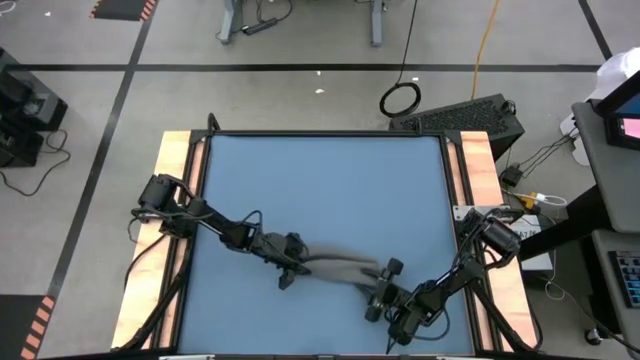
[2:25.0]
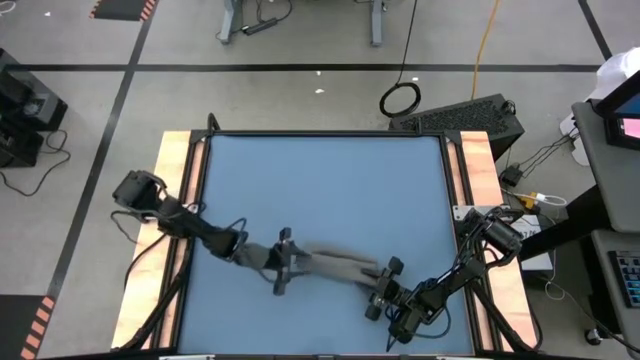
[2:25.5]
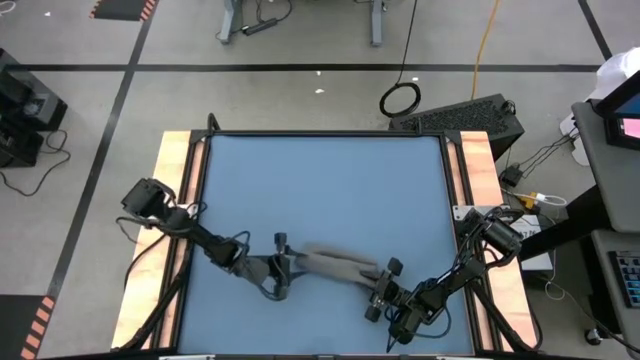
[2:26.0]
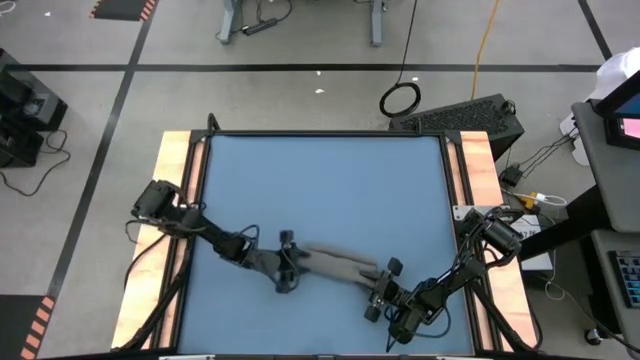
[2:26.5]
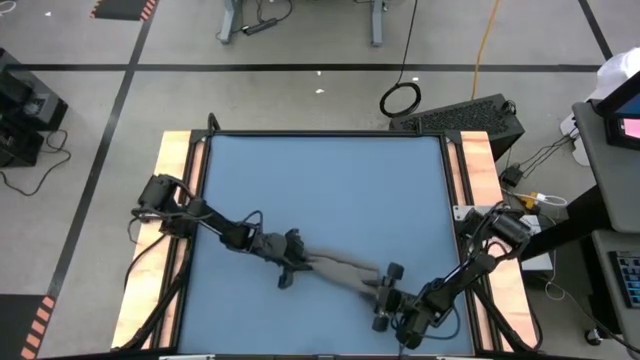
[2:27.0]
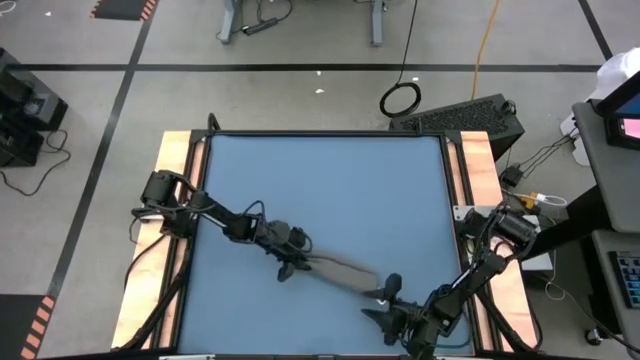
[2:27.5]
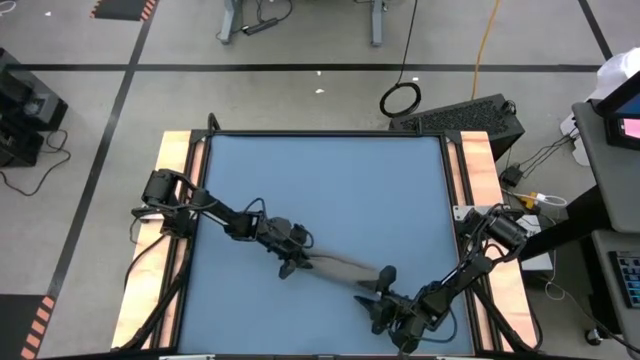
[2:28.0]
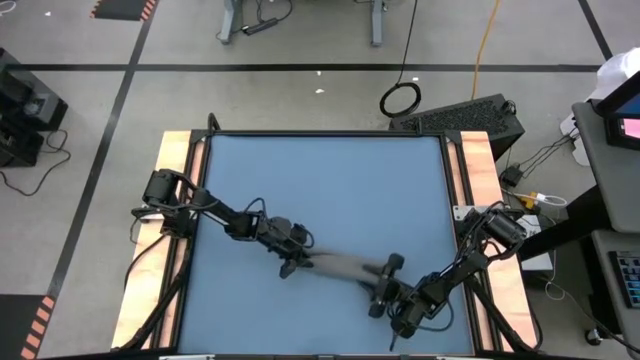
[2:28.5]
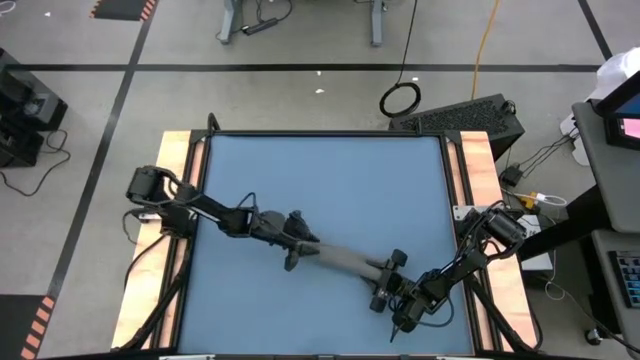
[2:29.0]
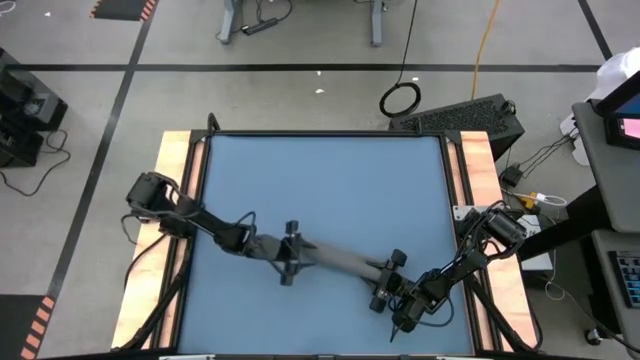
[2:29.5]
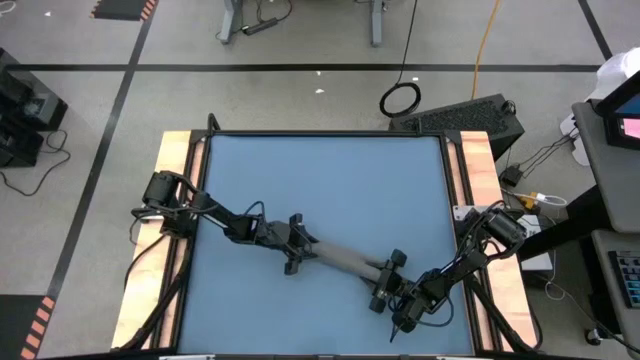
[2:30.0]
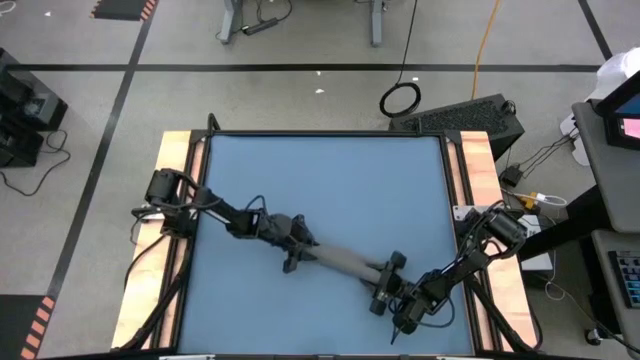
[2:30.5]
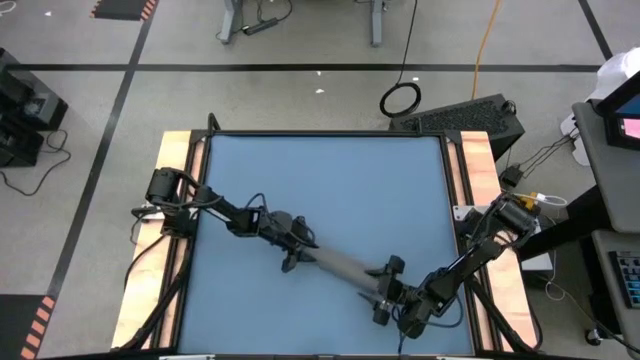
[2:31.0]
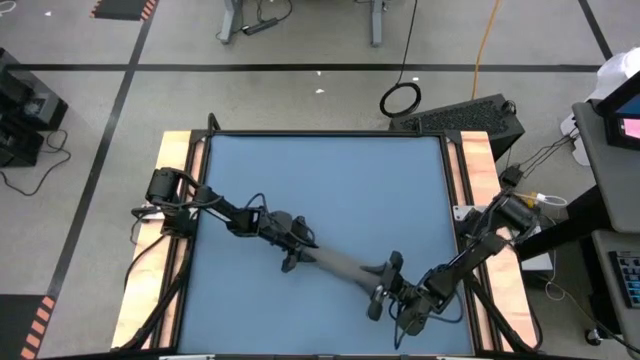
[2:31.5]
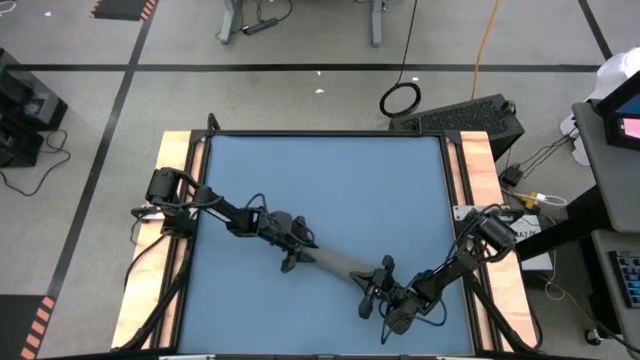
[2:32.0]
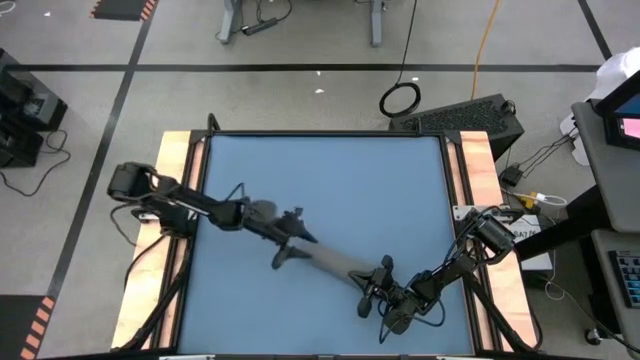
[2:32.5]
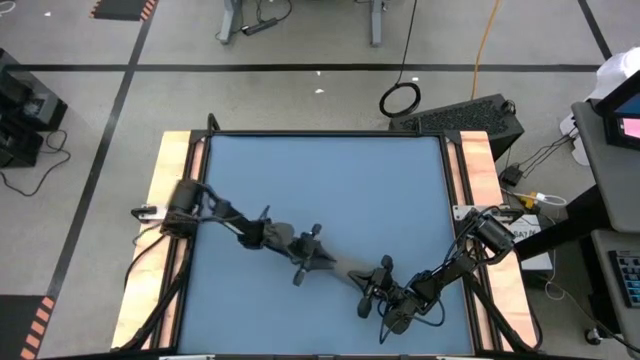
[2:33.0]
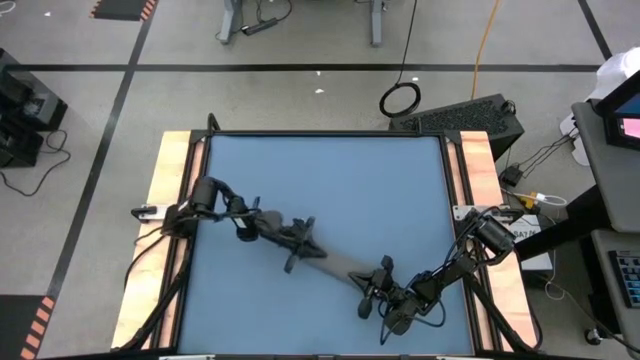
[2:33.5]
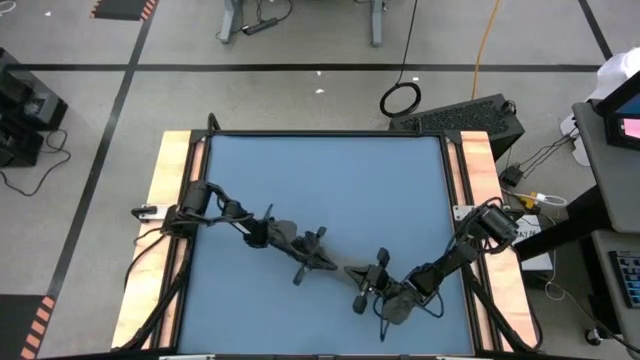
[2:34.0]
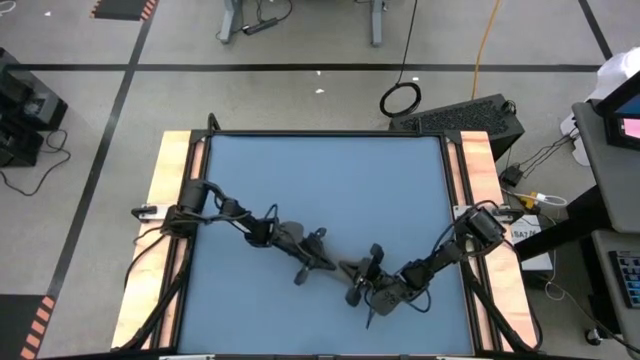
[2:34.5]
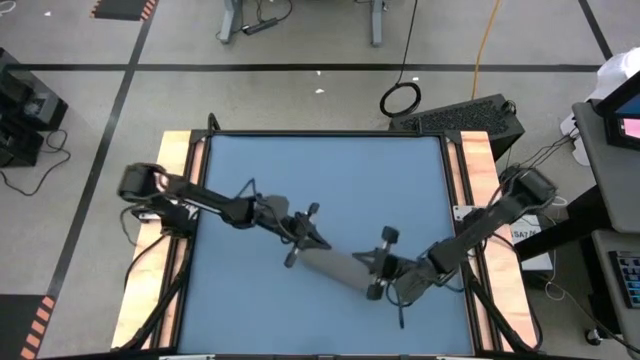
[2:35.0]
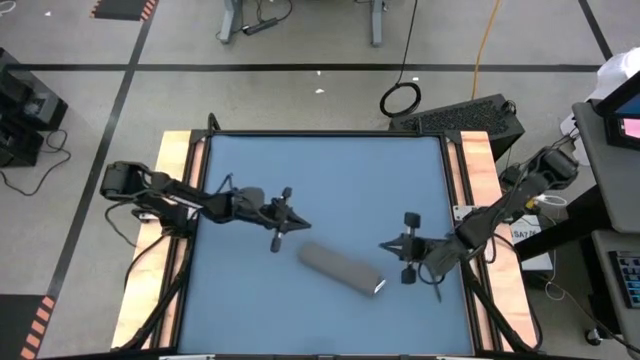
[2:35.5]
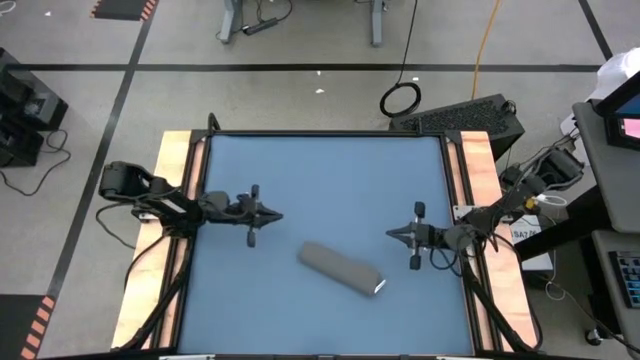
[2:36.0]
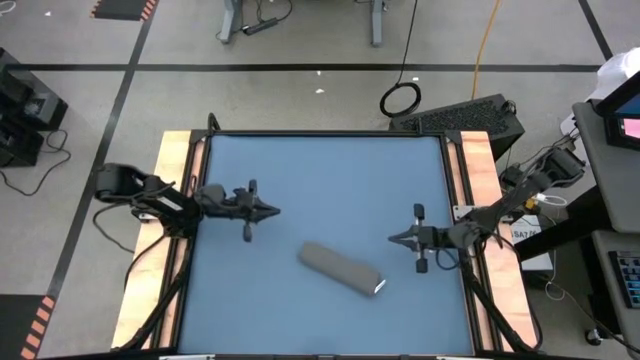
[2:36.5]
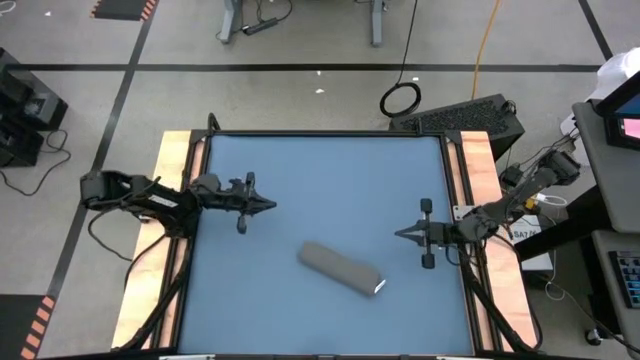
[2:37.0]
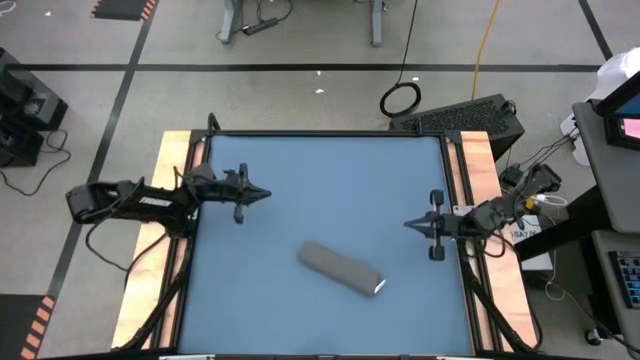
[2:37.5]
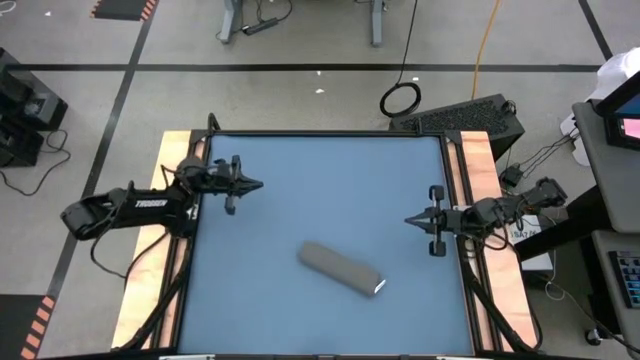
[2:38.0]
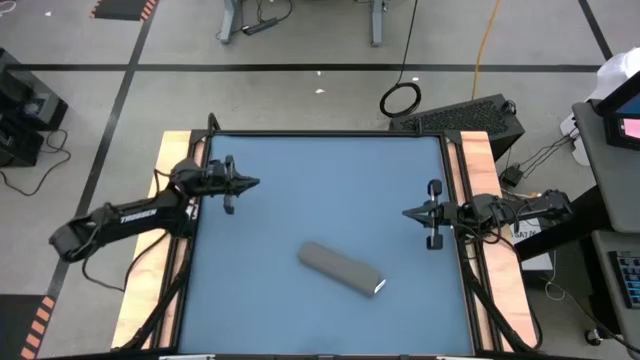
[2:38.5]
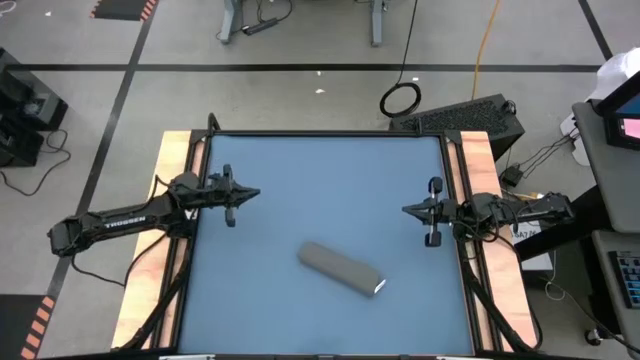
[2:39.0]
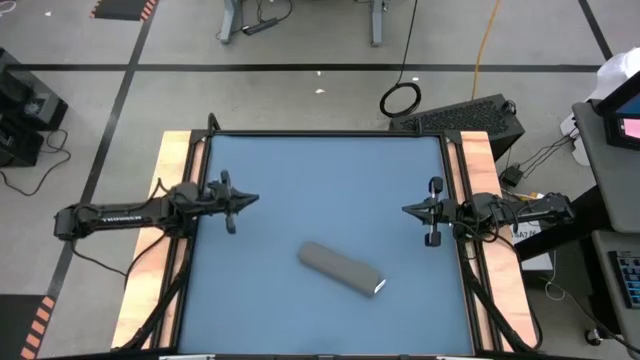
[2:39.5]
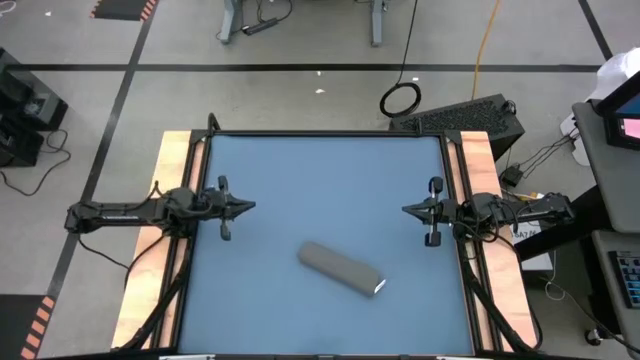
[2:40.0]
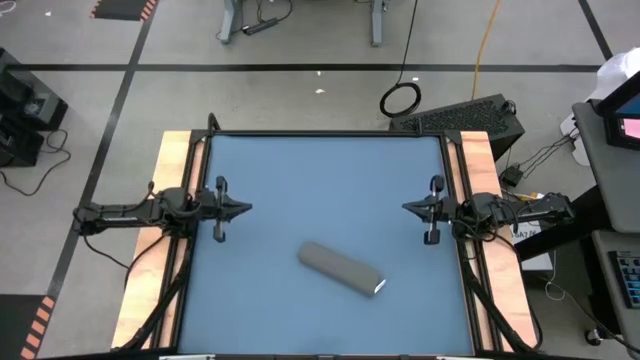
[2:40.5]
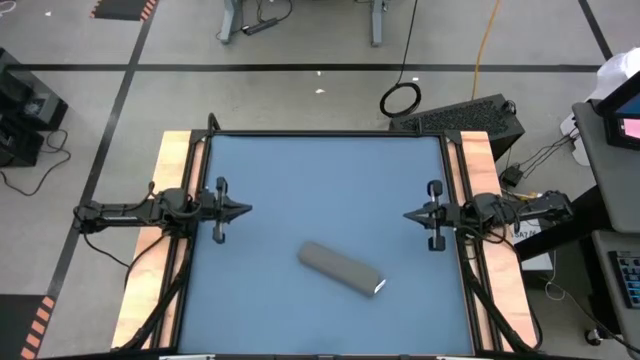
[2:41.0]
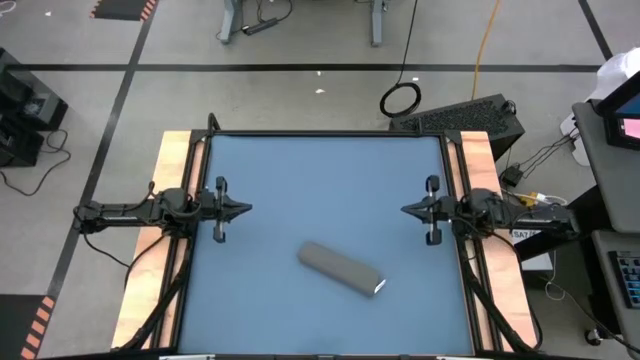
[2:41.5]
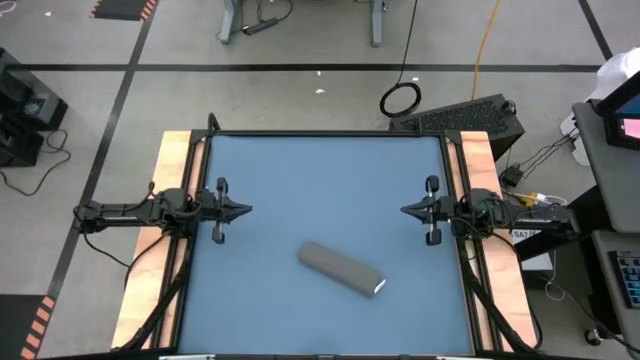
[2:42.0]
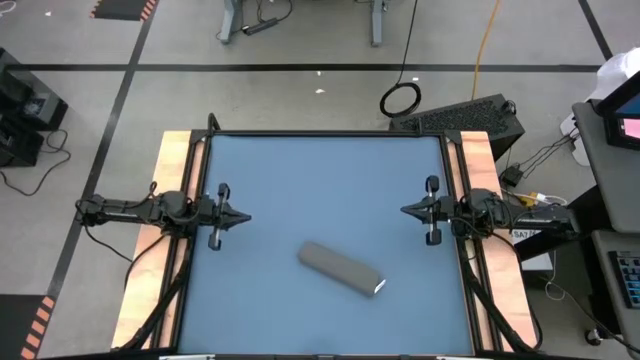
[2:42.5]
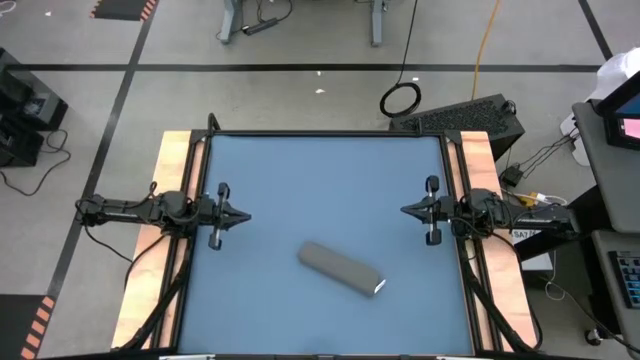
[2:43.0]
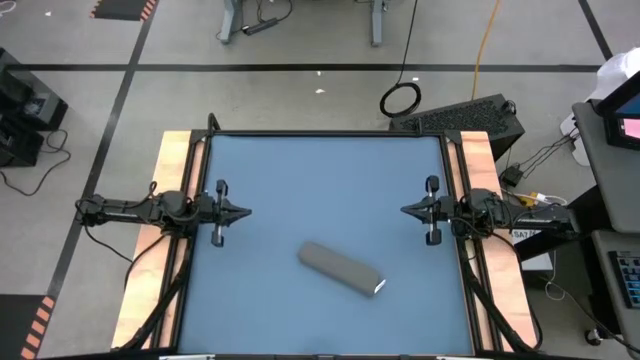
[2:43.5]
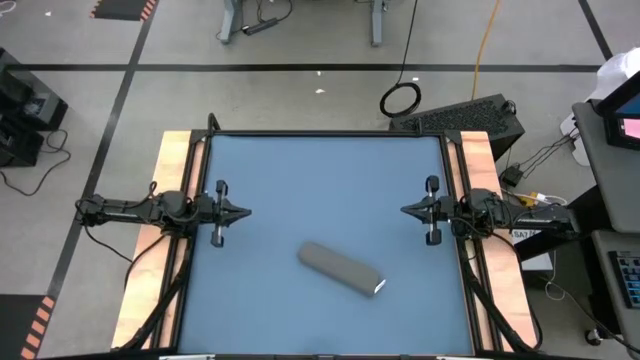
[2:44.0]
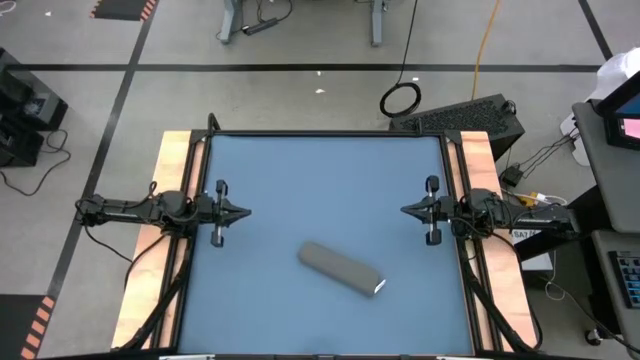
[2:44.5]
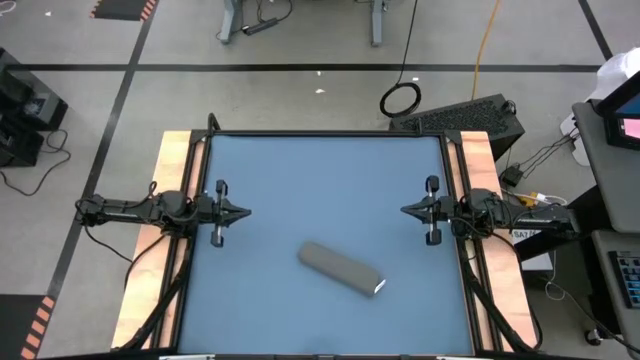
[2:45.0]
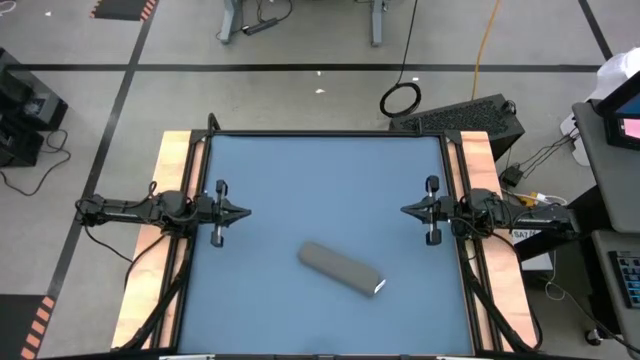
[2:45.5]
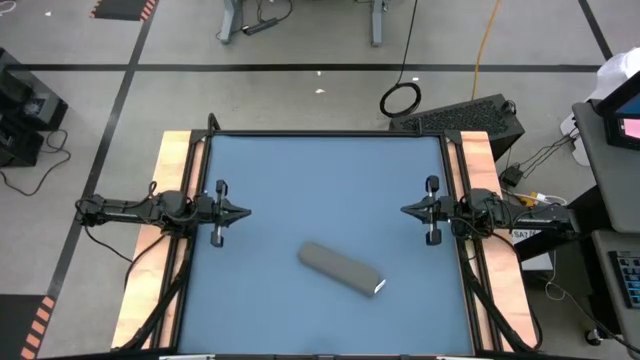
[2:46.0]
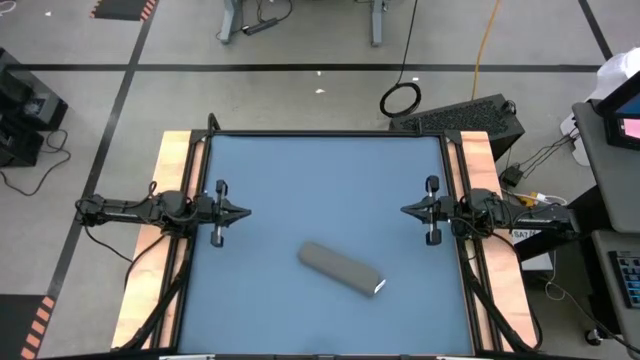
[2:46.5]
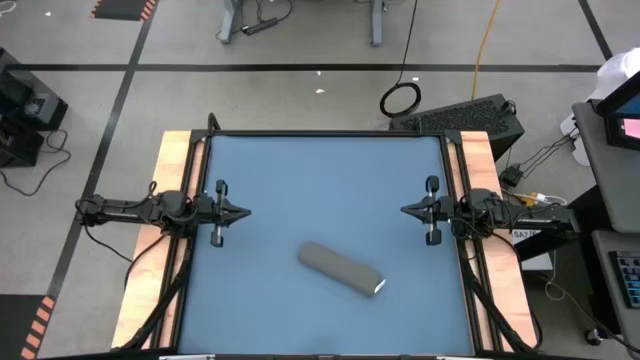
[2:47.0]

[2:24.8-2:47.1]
Task: Roll towel
Roll the gray towel
